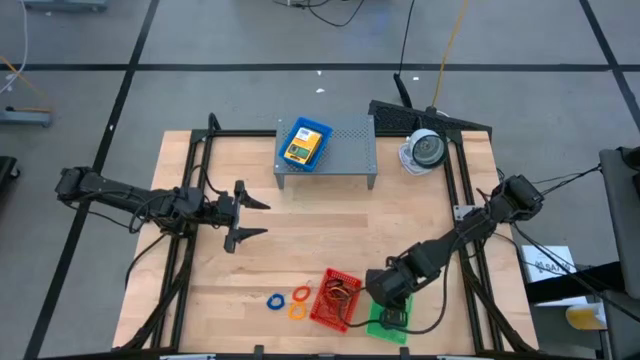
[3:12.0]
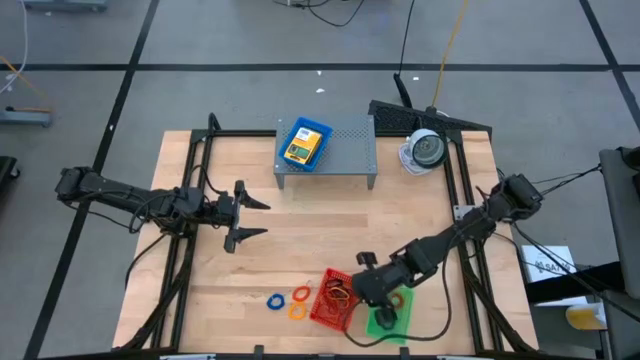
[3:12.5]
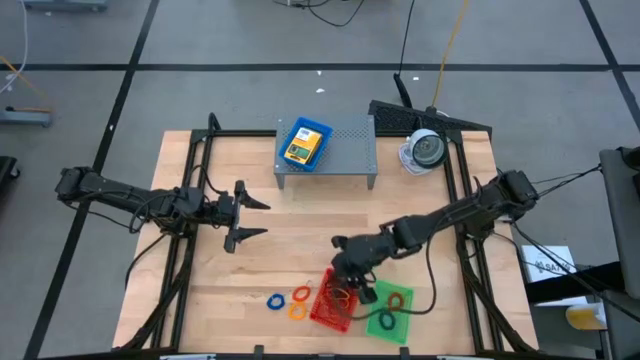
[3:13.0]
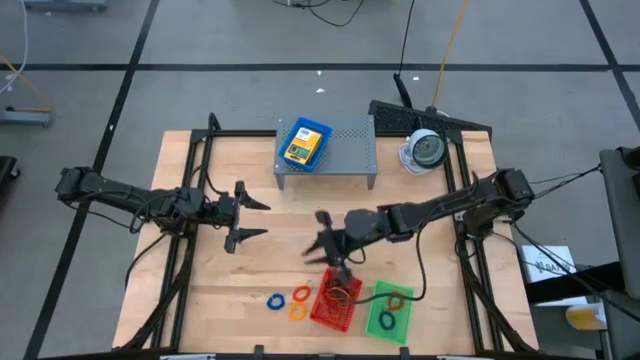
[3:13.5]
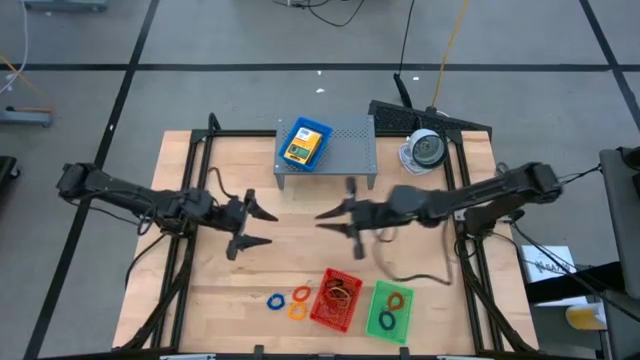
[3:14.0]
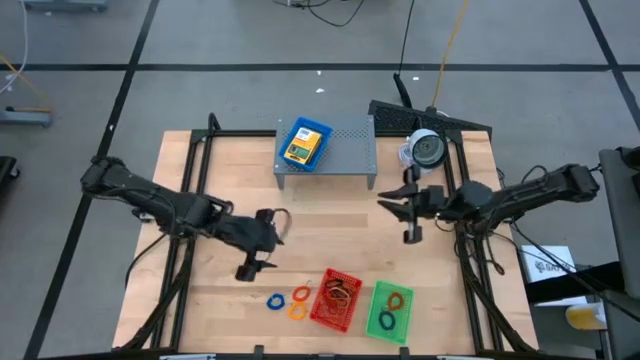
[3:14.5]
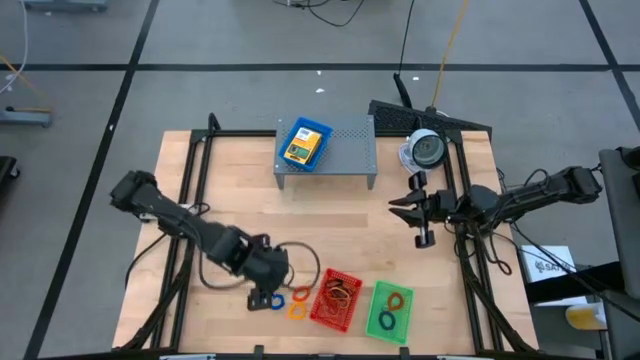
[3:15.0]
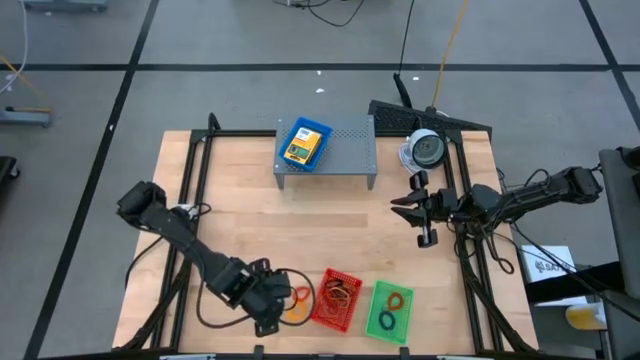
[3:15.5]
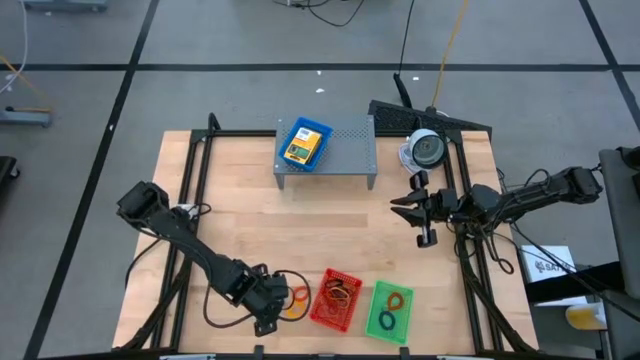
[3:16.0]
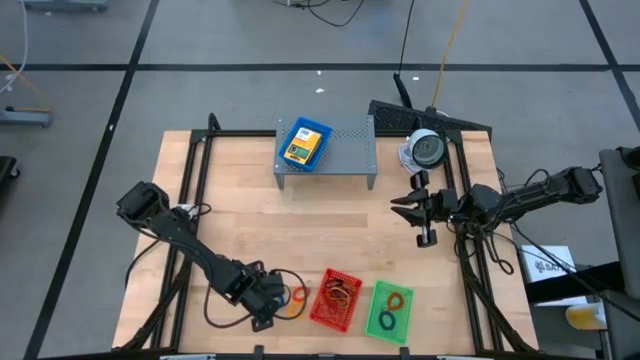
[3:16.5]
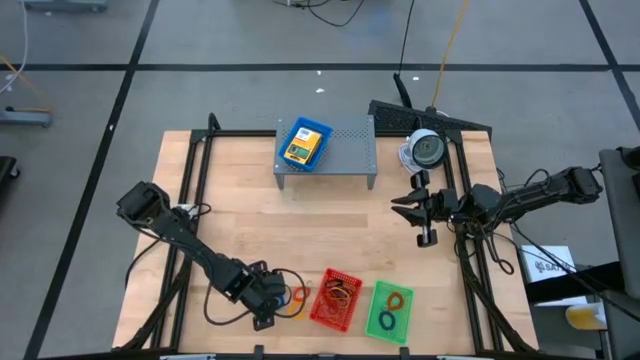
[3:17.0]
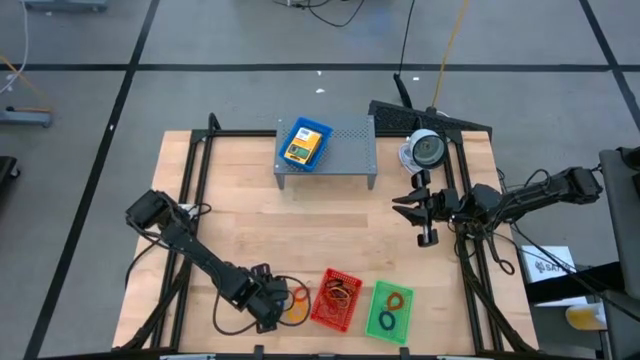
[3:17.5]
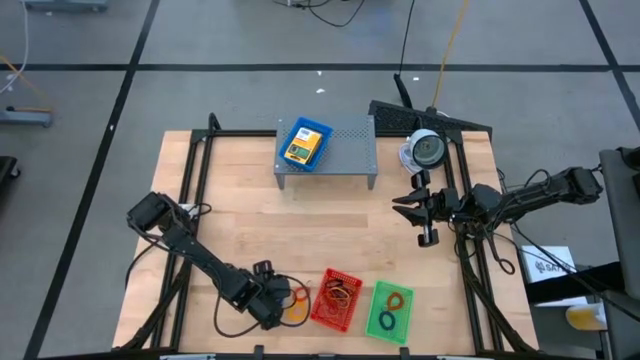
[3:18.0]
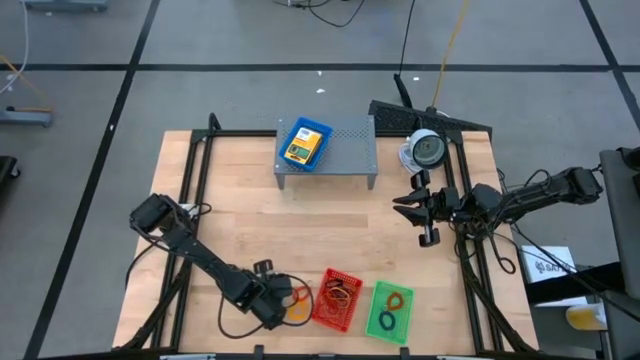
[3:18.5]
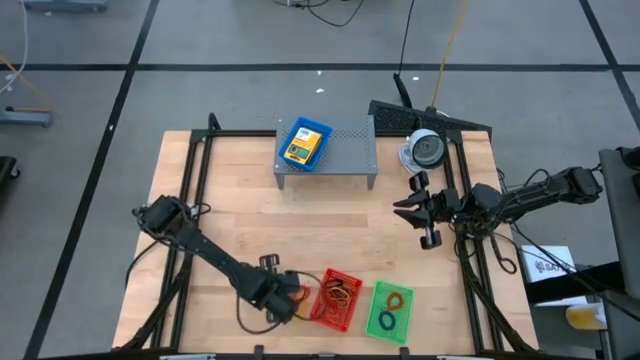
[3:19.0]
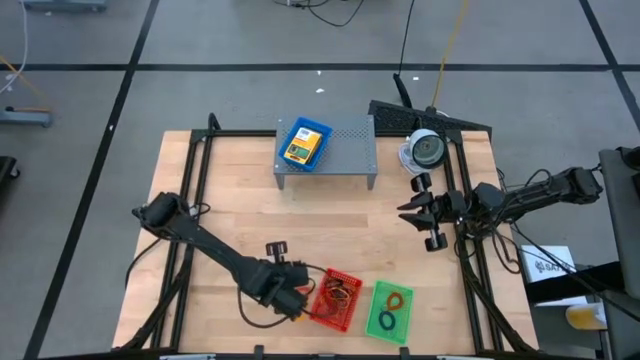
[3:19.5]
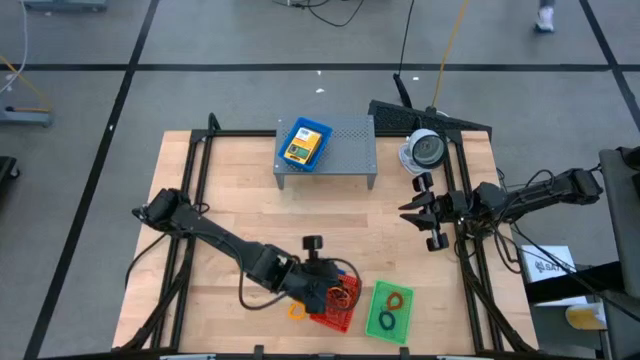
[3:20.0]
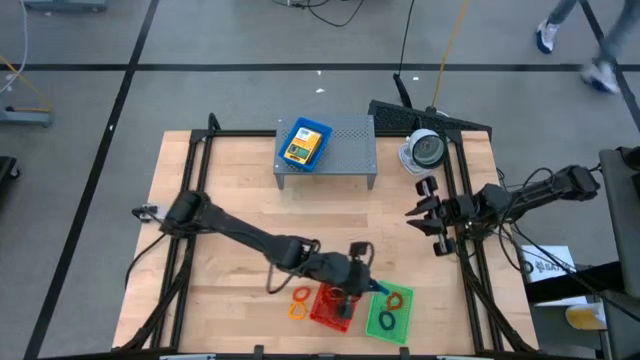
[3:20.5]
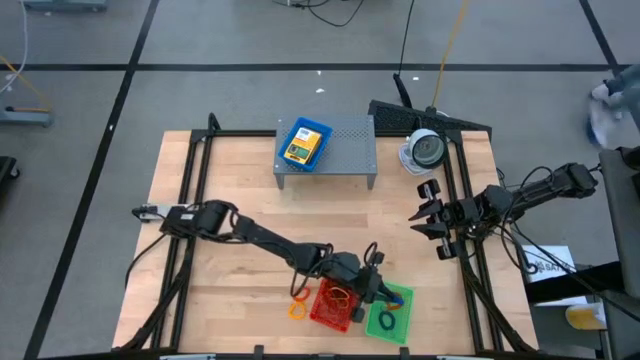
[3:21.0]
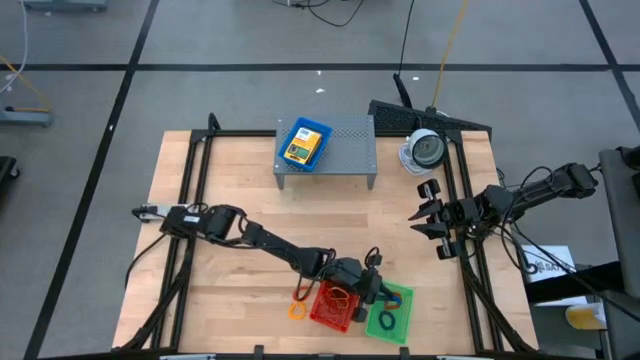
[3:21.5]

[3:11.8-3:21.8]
Task: Pick & Place Office Desk Supplies
Put the blue spring rubberband into the green bin

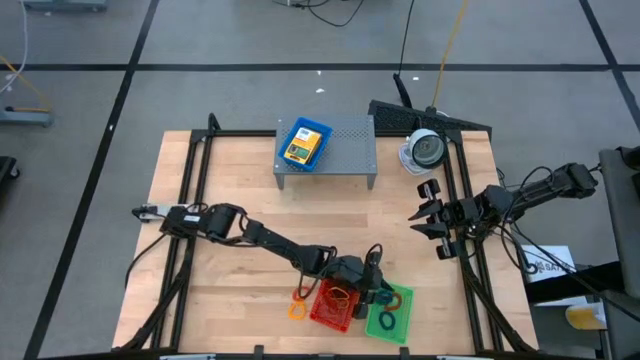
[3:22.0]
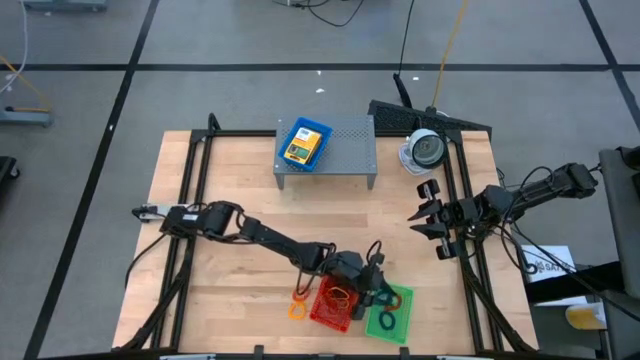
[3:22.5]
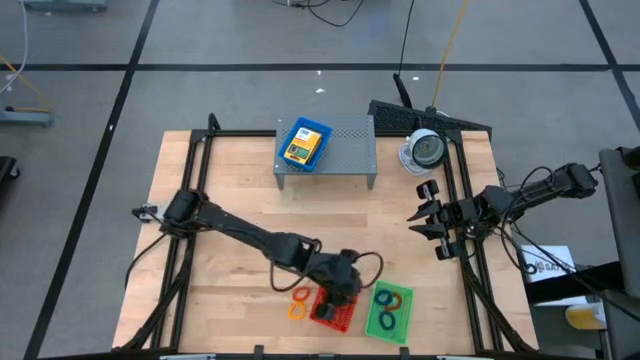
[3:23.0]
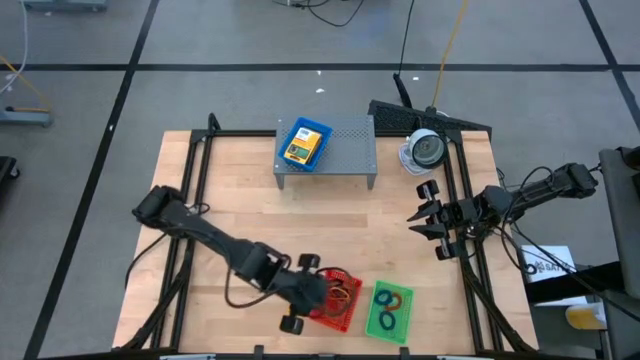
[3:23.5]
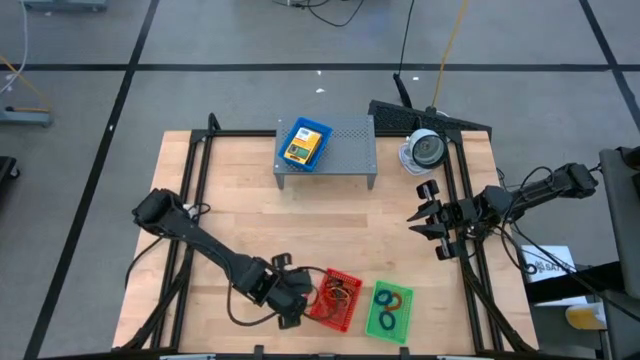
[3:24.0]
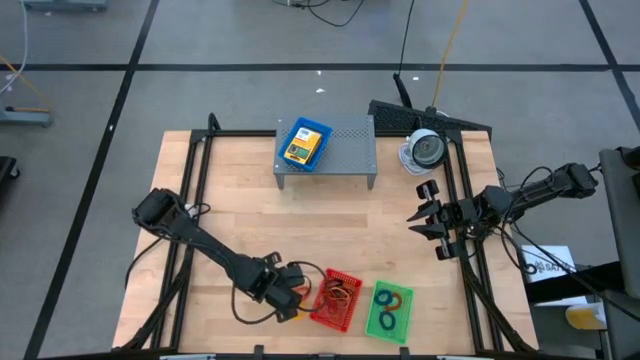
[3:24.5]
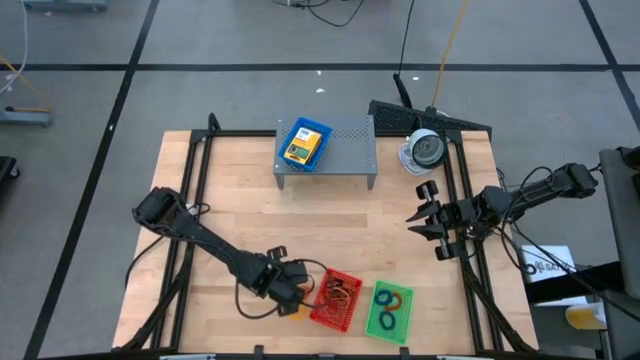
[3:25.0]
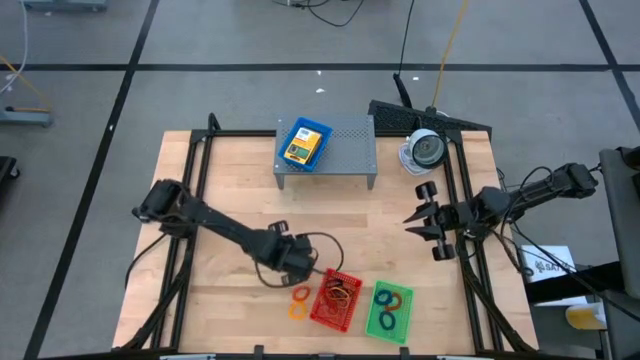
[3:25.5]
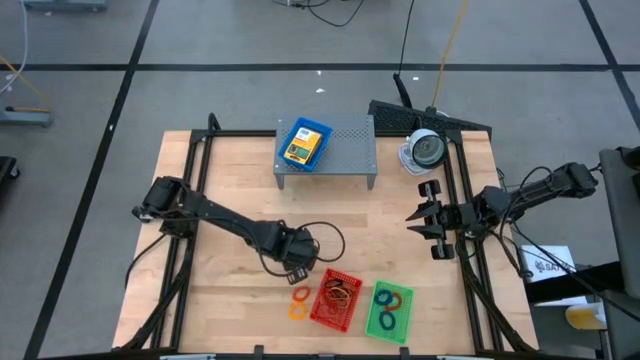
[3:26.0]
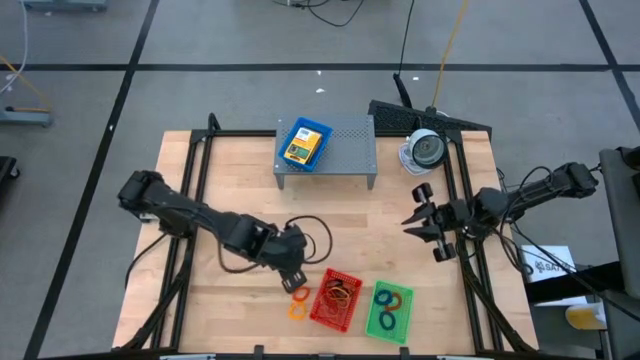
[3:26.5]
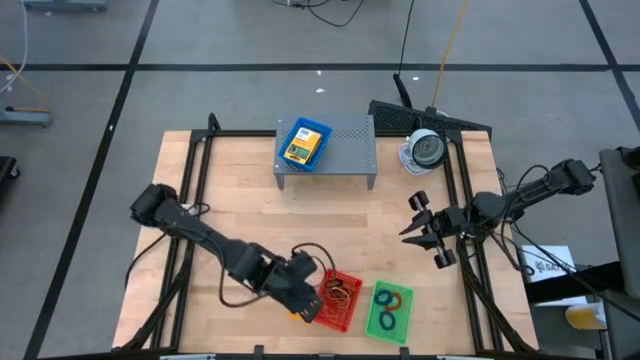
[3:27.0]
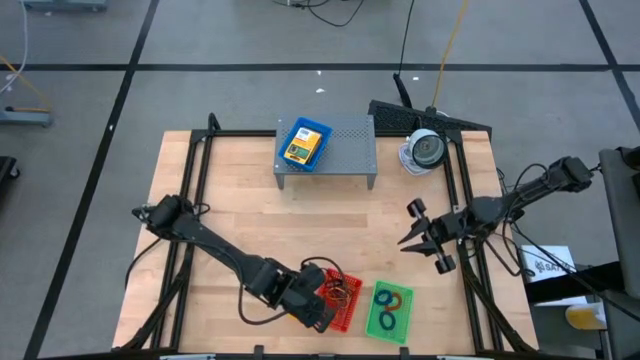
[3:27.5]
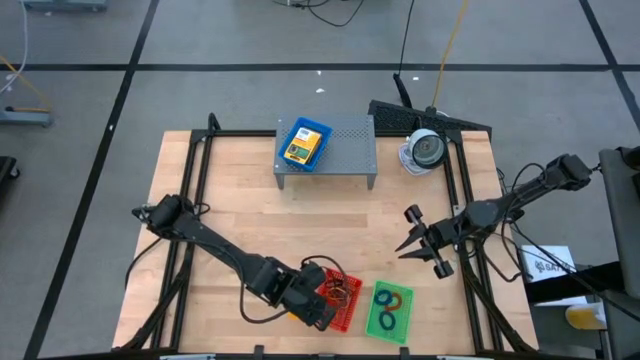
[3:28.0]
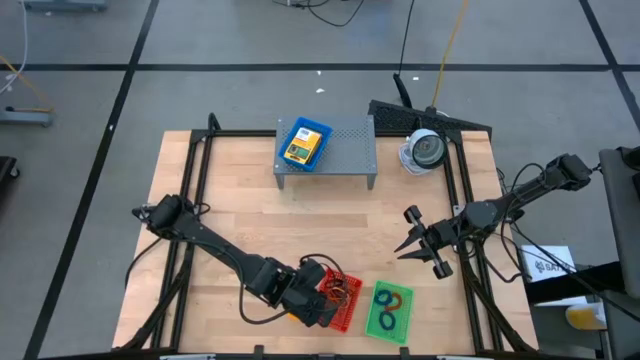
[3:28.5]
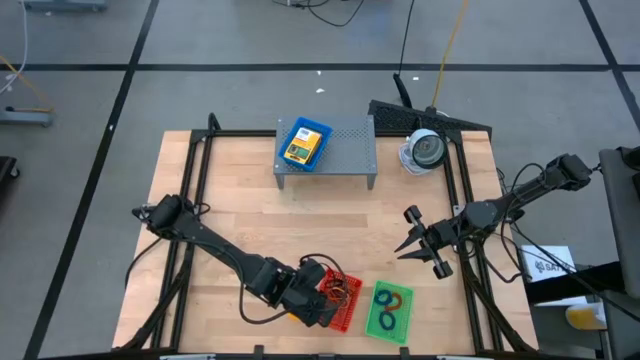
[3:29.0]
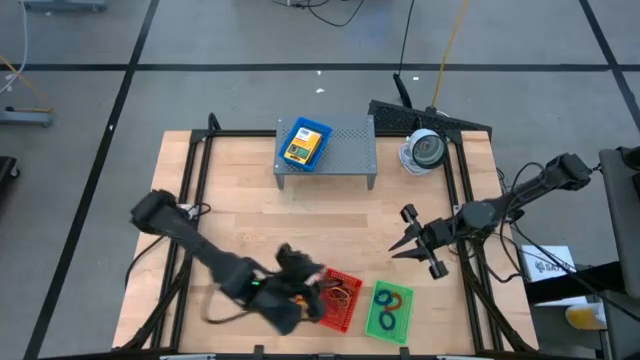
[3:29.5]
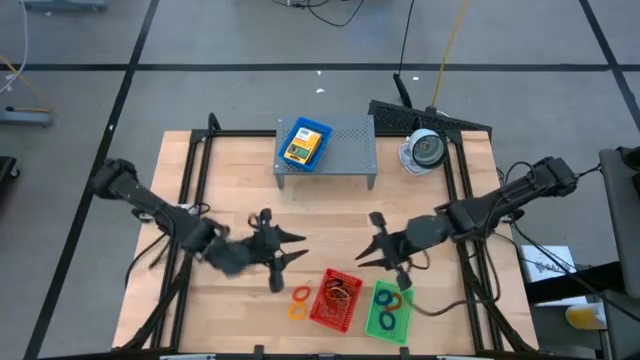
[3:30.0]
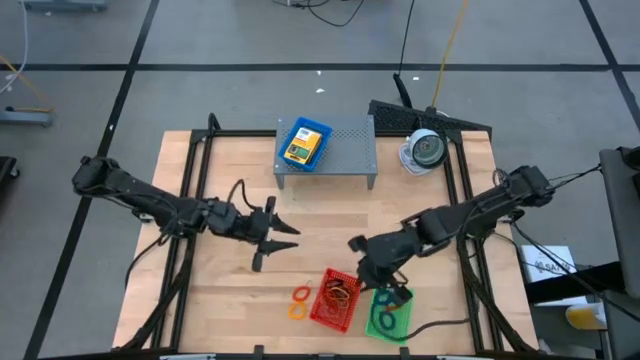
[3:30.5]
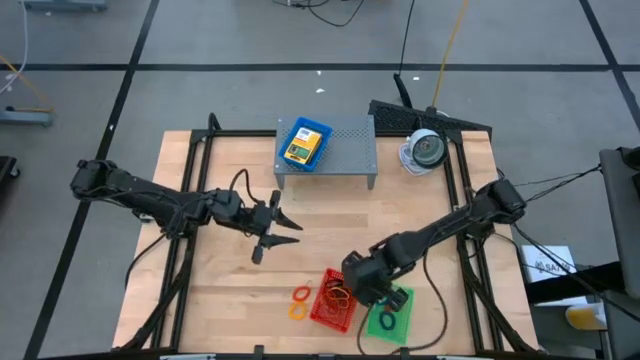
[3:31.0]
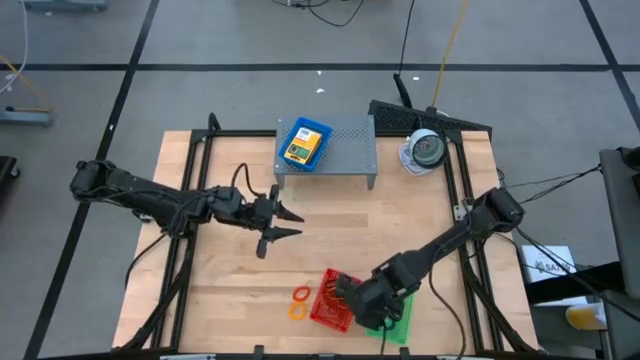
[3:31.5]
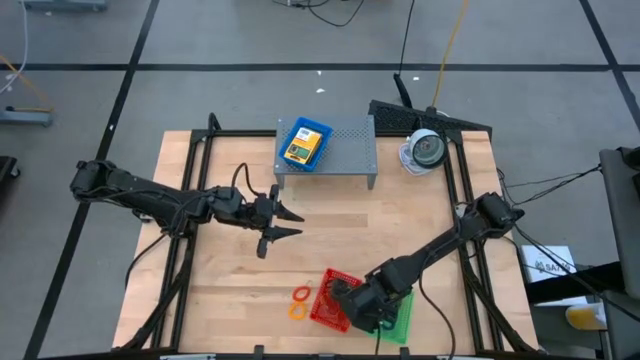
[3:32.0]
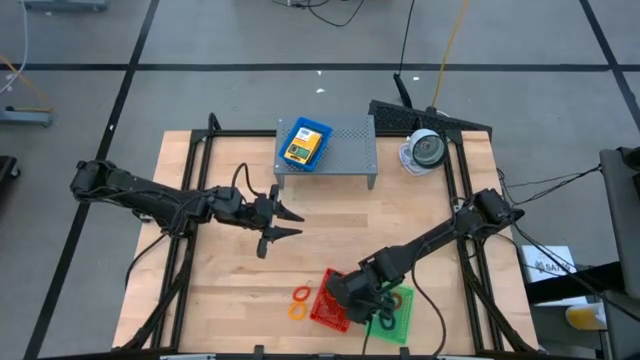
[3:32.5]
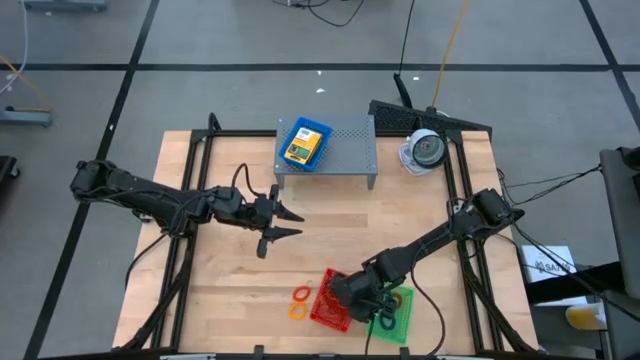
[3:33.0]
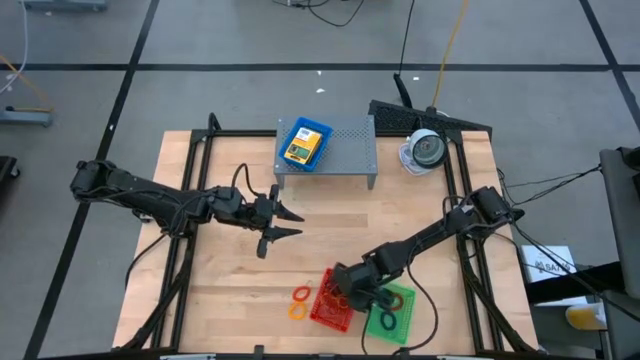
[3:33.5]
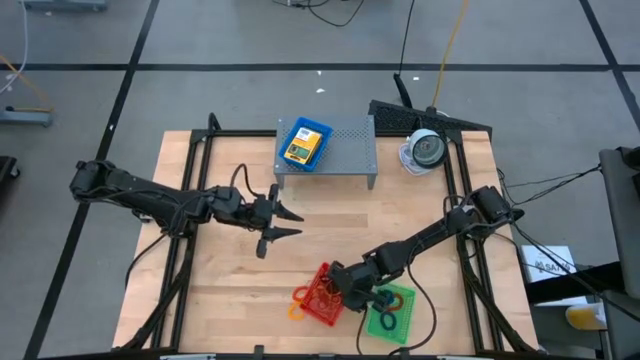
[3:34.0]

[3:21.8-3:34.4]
Put the red bin on the shelf
